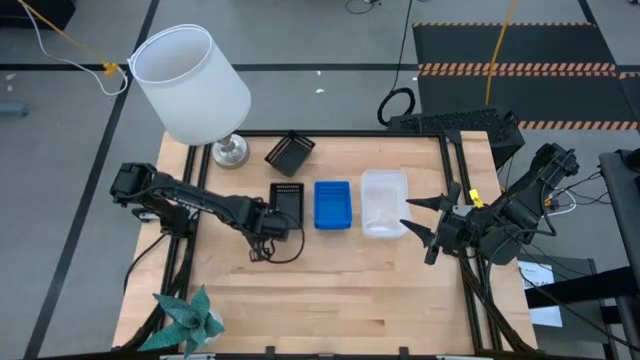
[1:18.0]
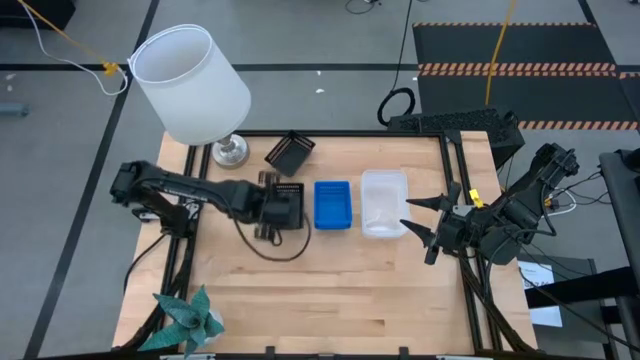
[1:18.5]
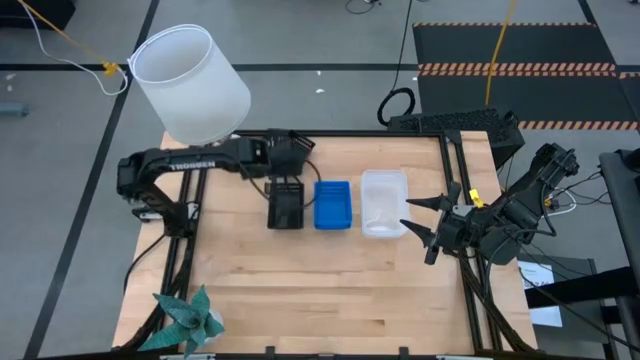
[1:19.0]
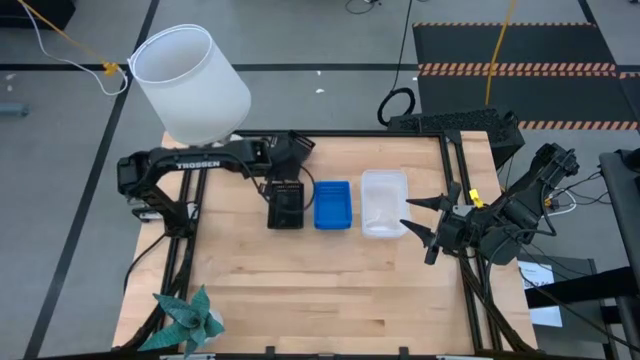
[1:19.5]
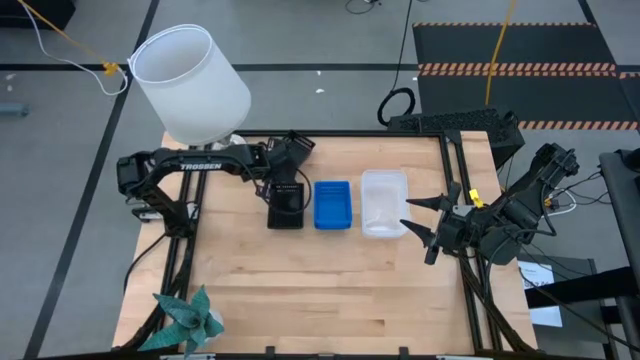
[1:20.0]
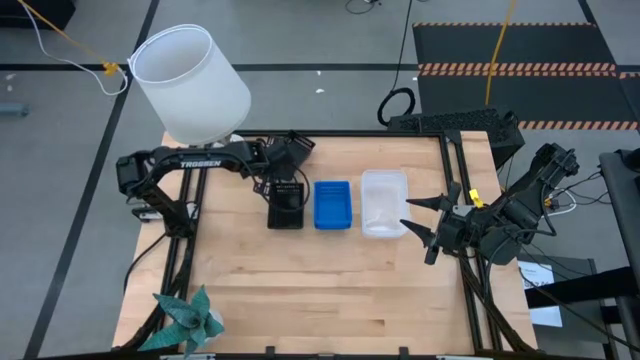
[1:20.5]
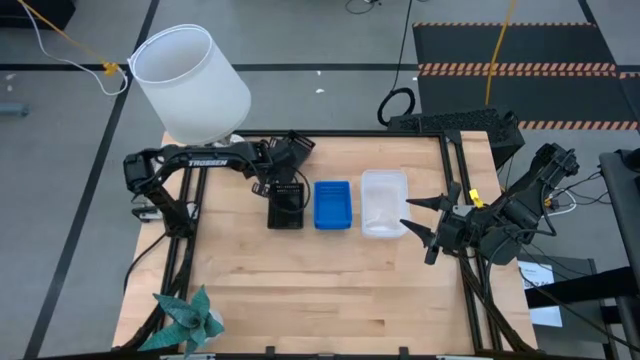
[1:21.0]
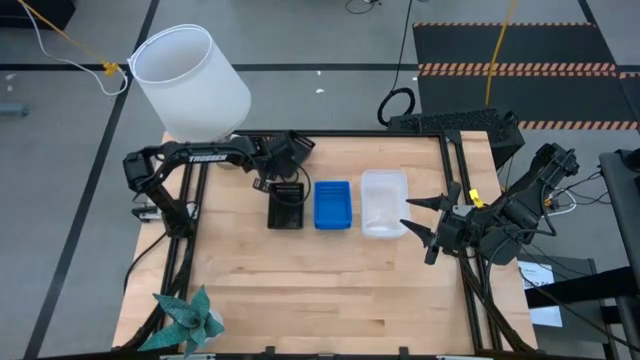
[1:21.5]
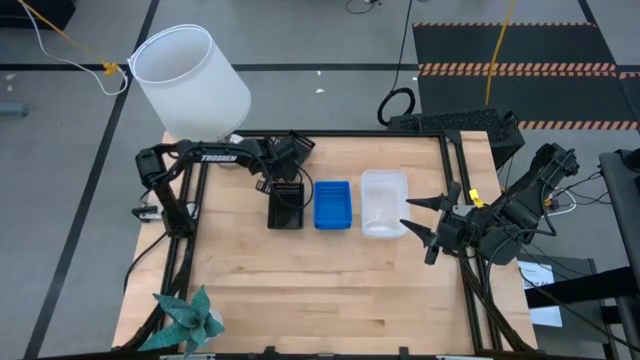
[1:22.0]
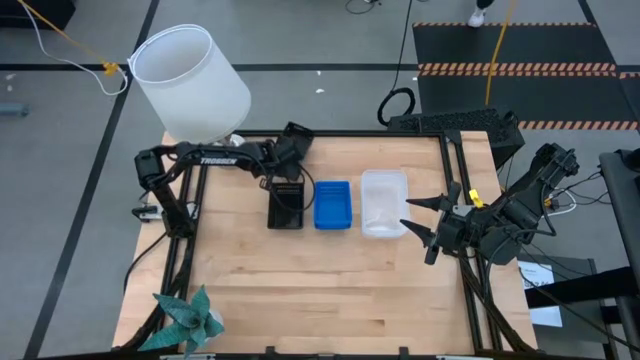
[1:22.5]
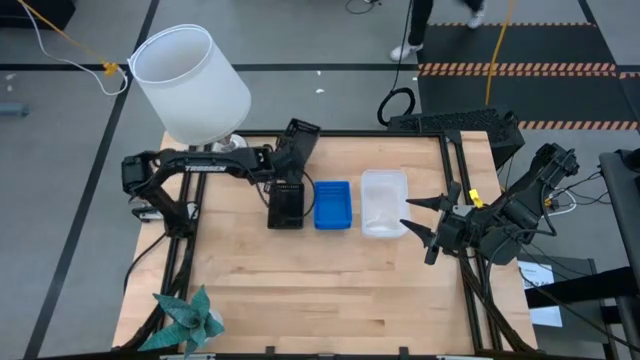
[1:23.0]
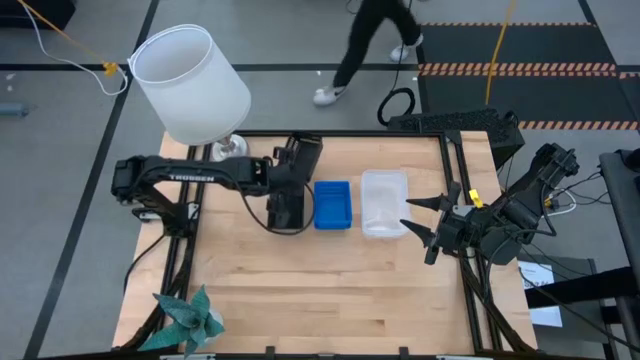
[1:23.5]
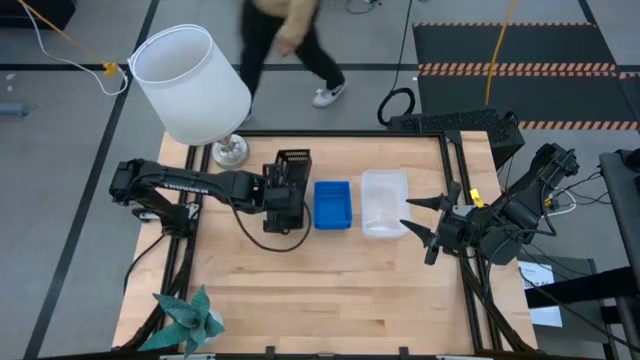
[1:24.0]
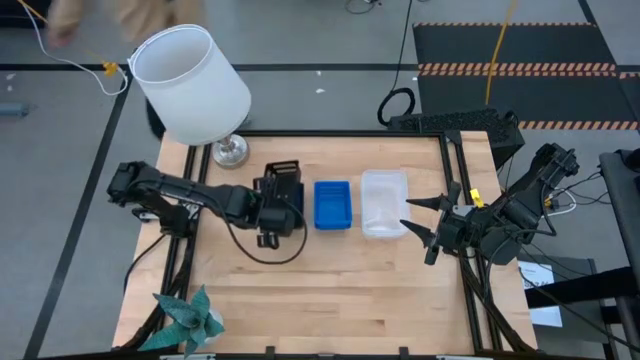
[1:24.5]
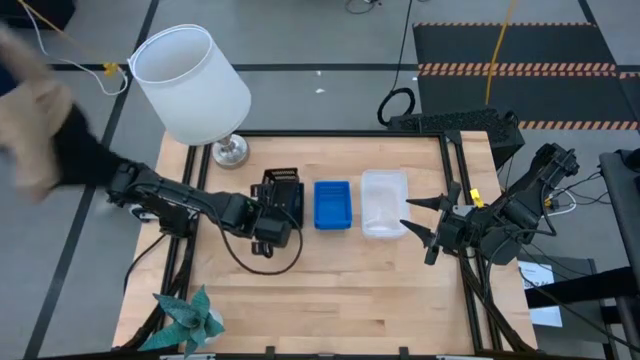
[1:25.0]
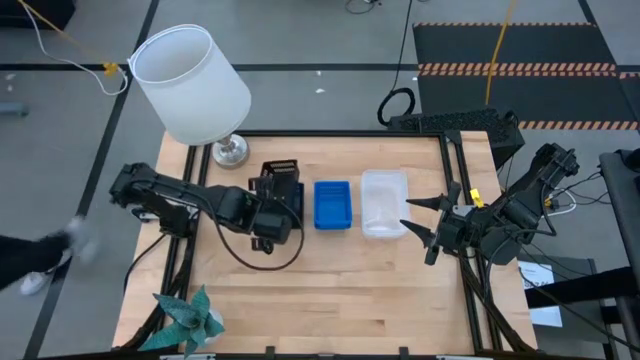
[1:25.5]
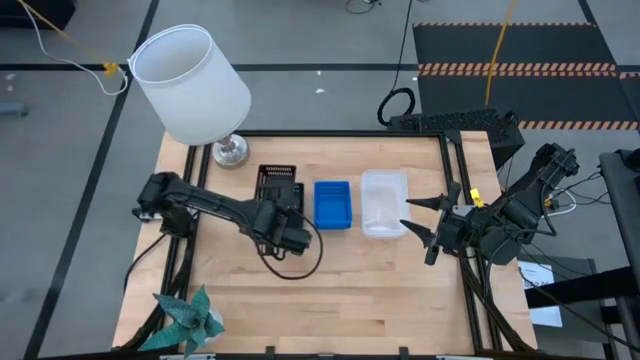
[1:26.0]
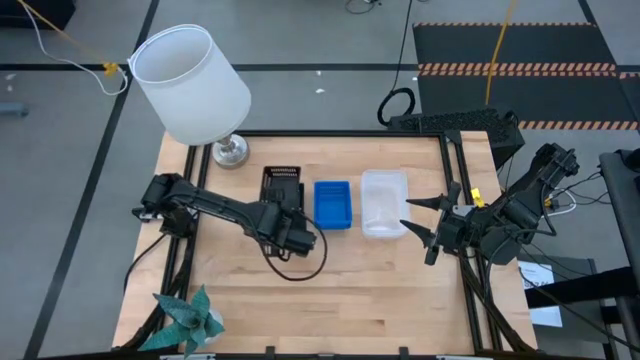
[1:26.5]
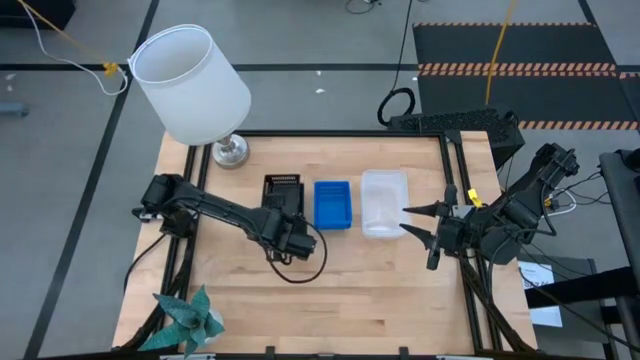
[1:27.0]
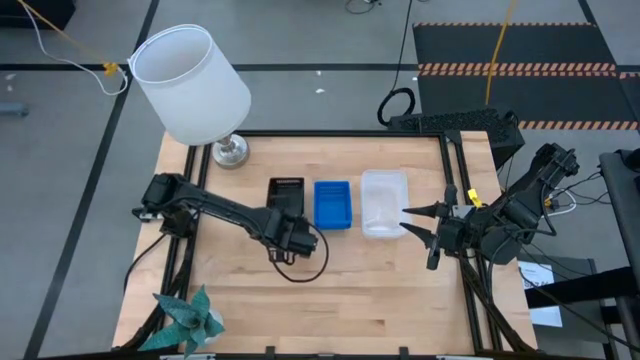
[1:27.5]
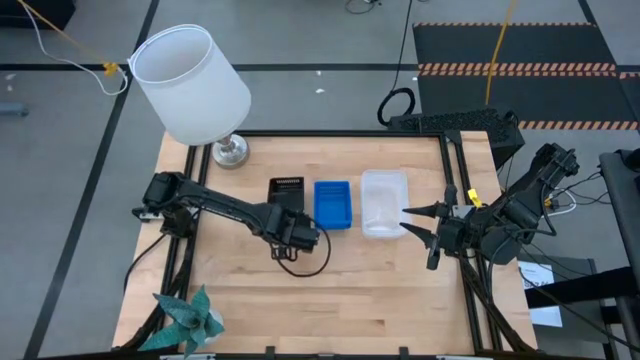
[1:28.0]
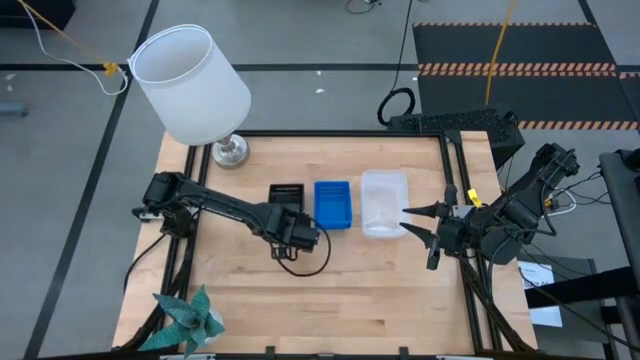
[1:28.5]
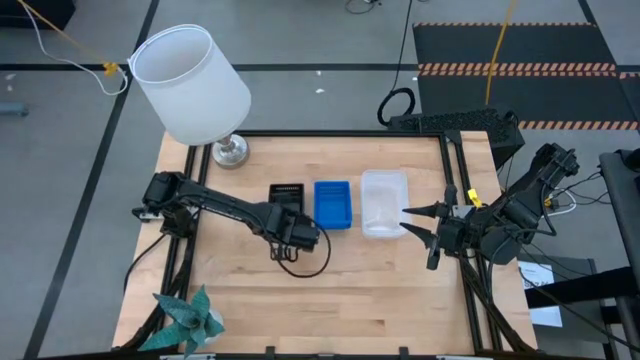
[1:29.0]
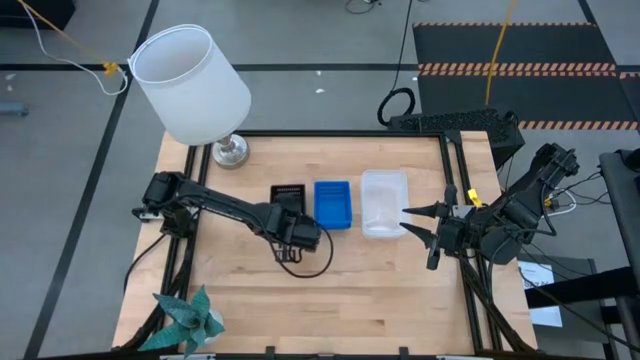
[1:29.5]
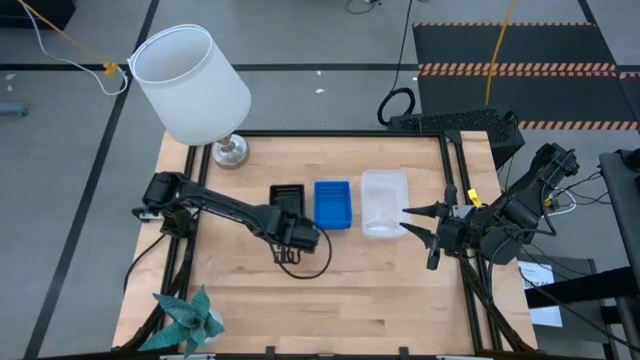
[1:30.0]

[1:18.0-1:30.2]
Stack the top black bin on top of the bottom black bin

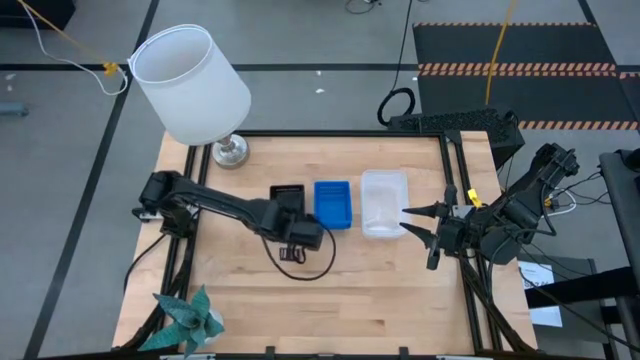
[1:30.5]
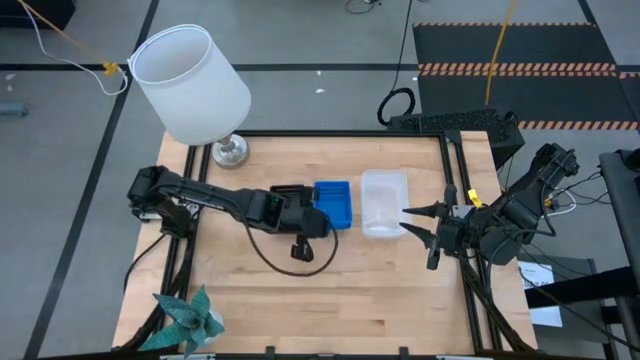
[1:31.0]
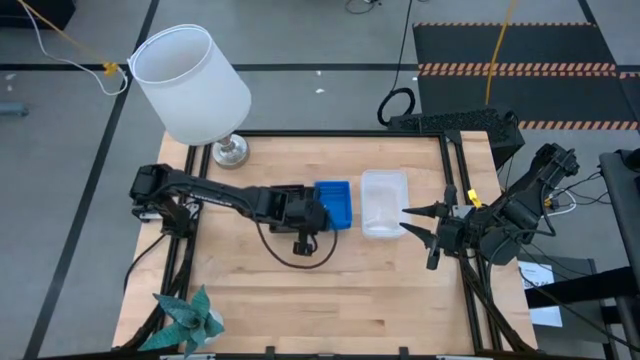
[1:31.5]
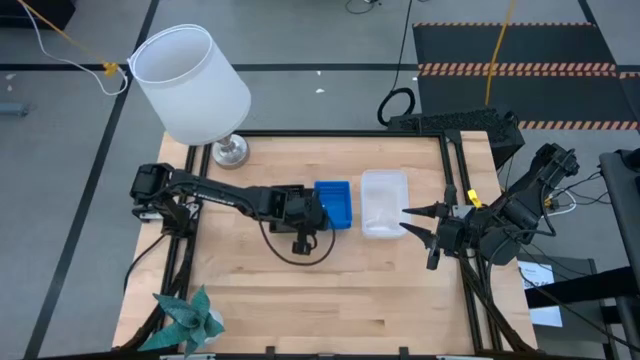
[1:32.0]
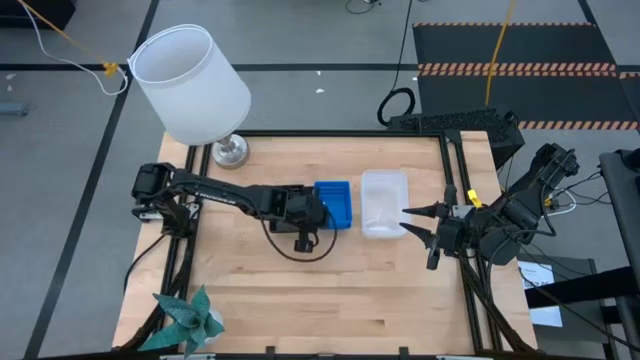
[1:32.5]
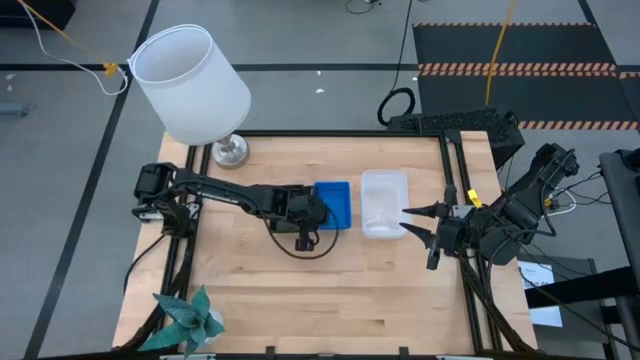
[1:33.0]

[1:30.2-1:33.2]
Adjust the blue bins

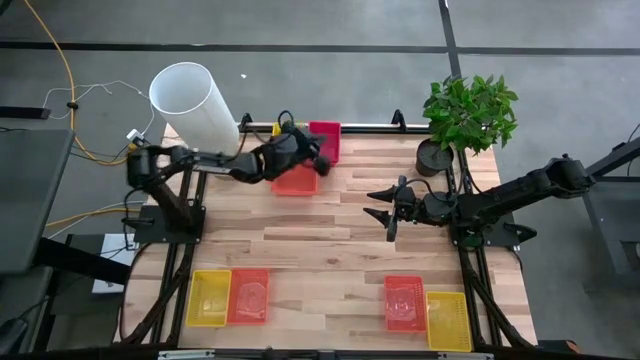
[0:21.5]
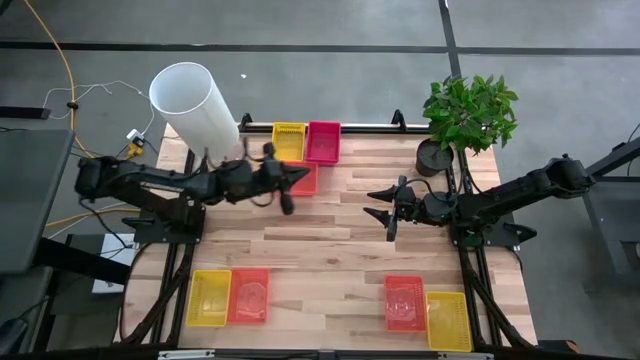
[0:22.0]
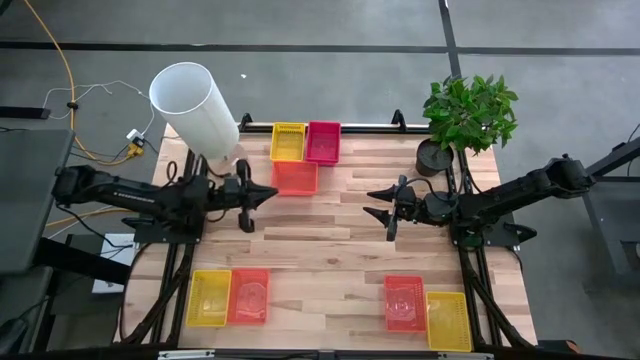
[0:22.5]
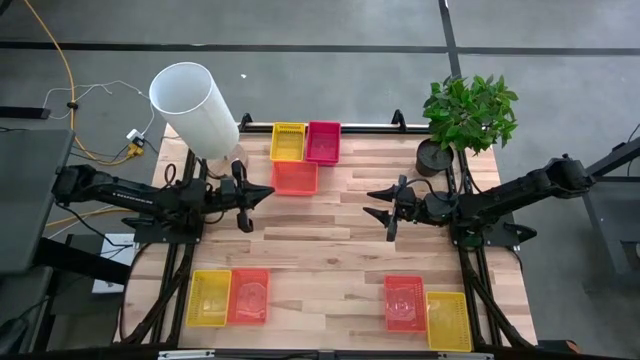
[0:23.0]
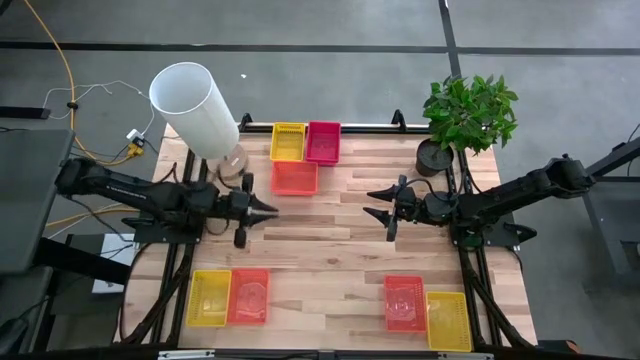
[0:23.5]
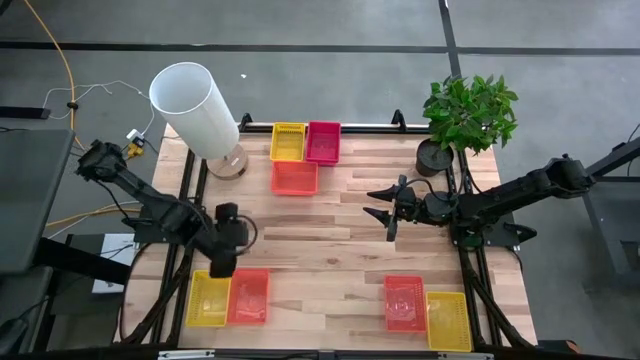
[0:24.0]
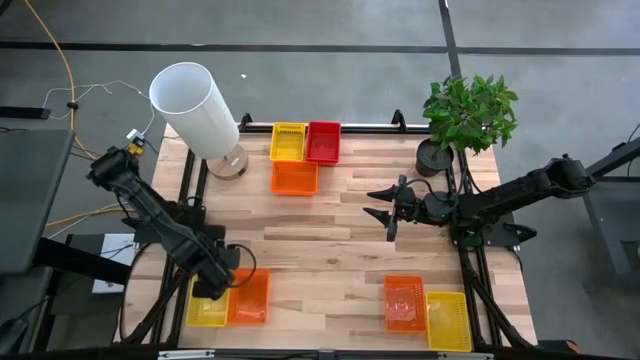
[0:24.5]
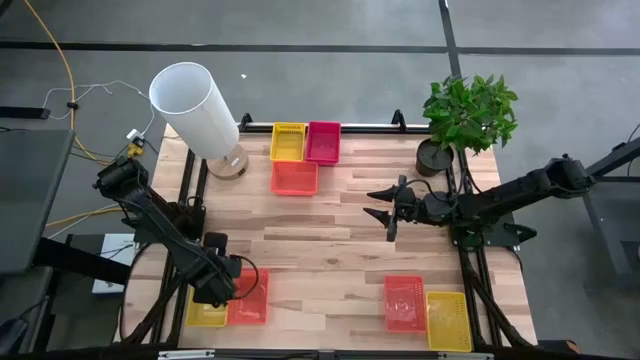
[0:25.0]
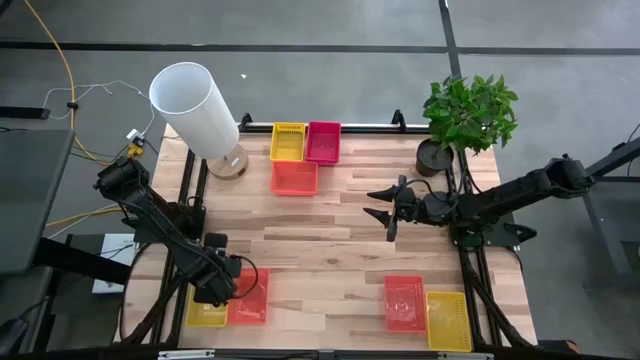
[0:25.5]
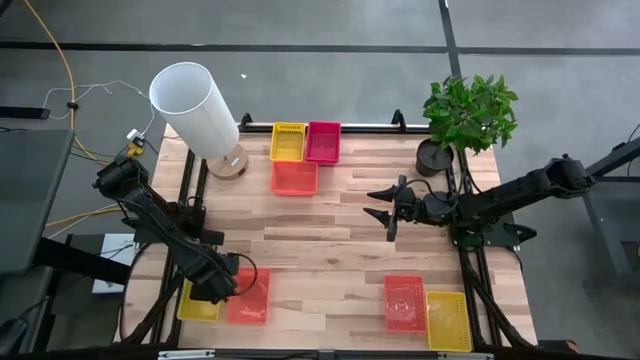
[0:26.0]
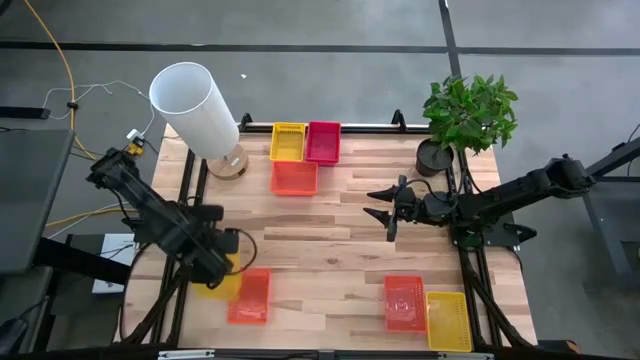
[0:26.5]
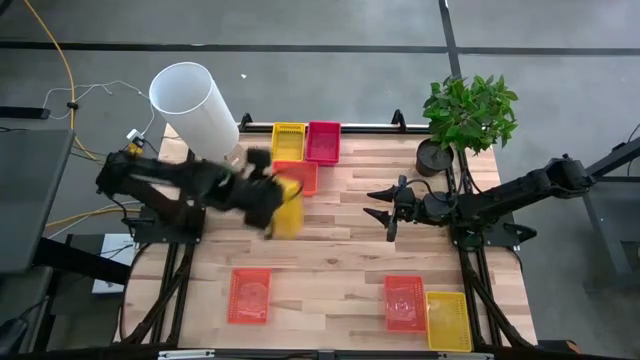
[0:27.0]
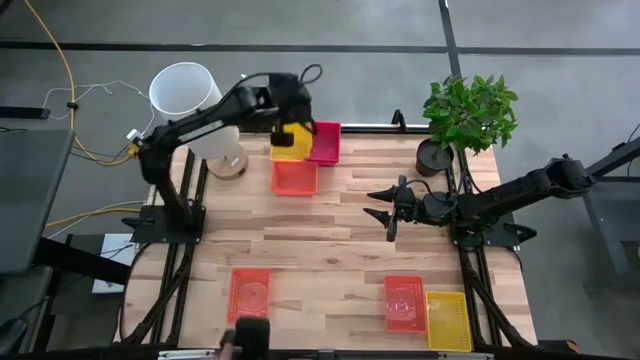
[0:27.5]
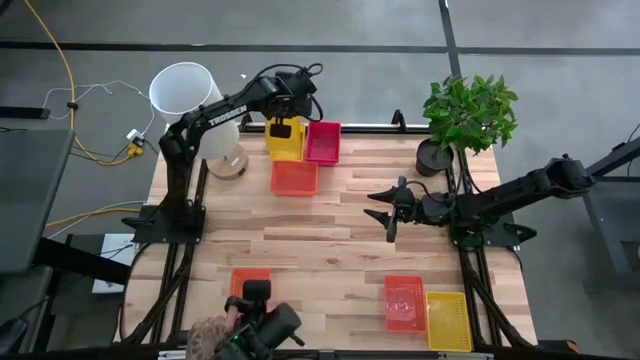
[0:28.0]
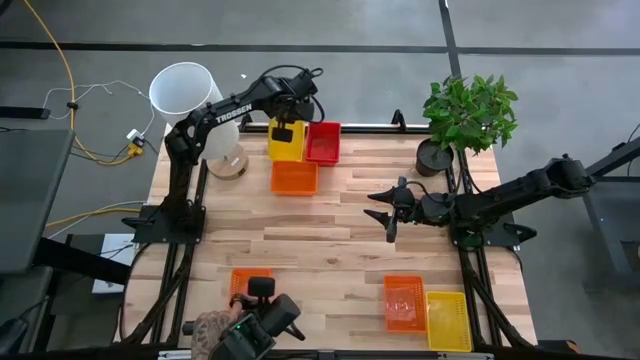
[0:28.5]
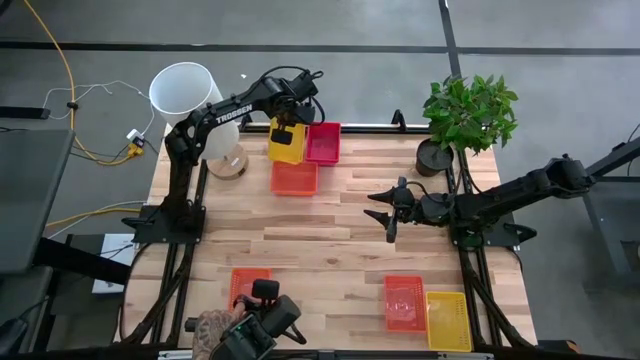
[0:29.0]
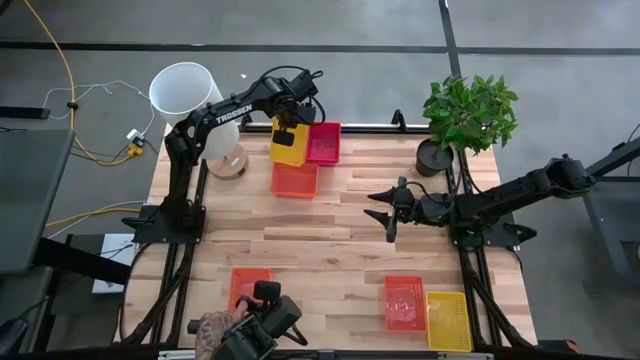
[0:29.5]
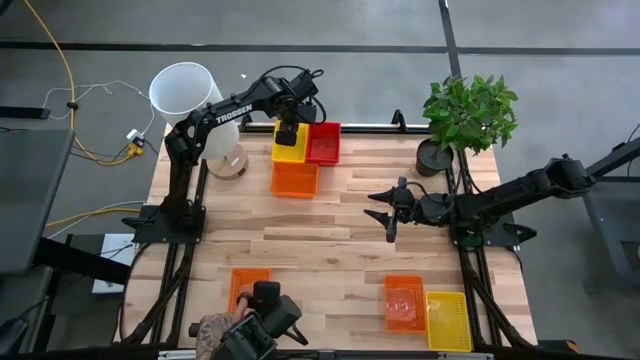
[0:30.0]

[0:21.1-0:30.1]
Stack the bottom left yellow bin on top of the top yellow bin
